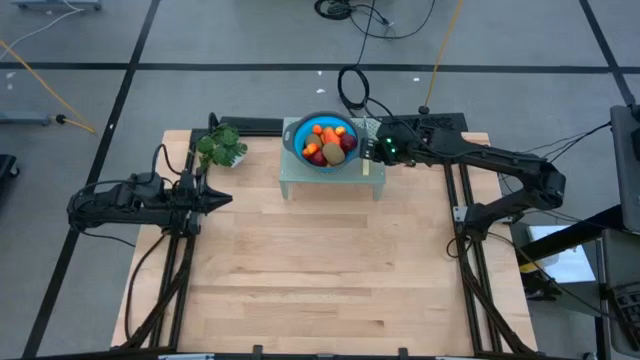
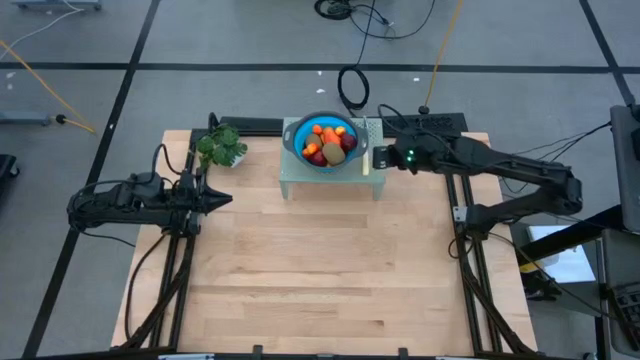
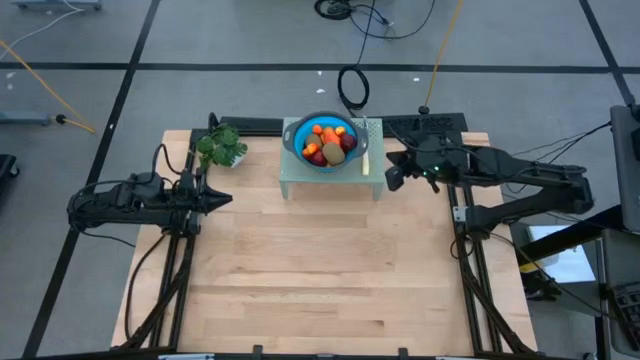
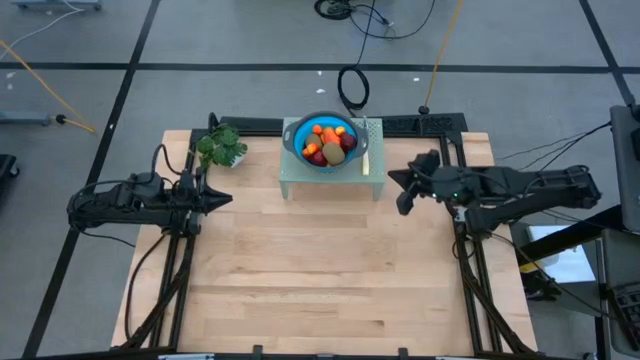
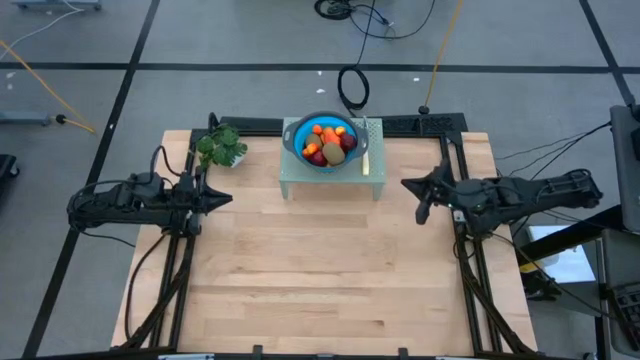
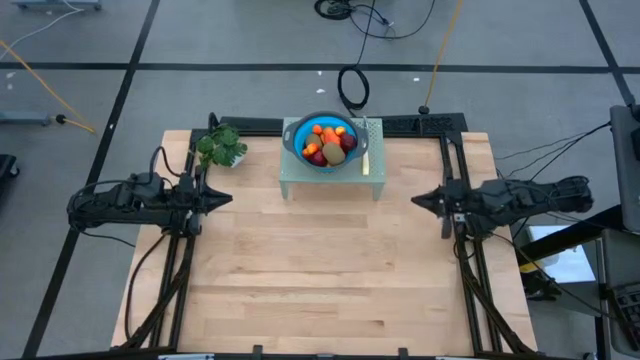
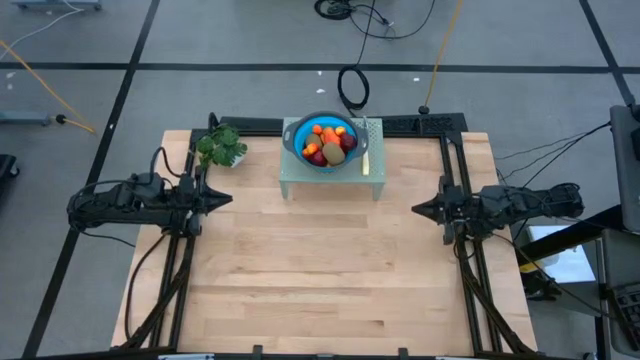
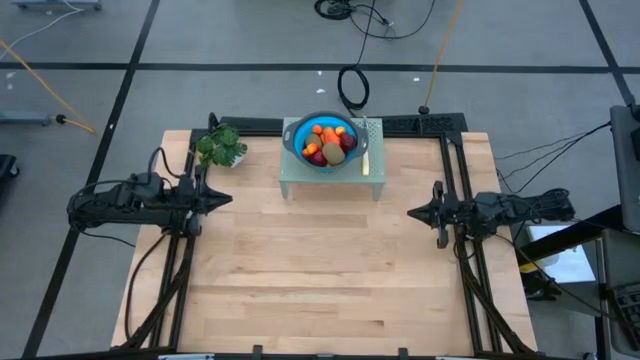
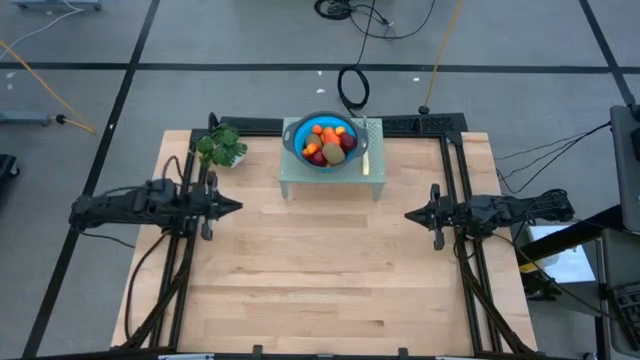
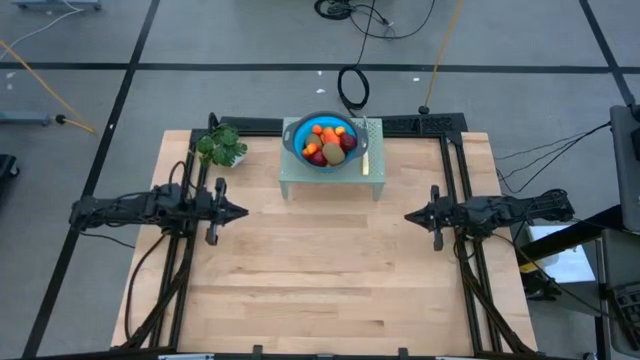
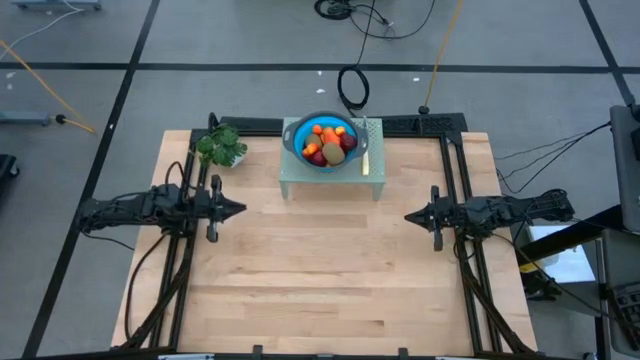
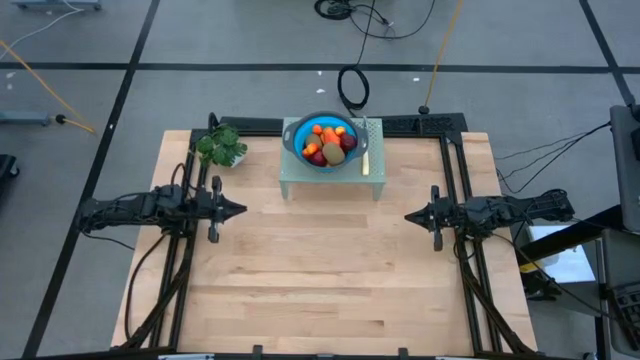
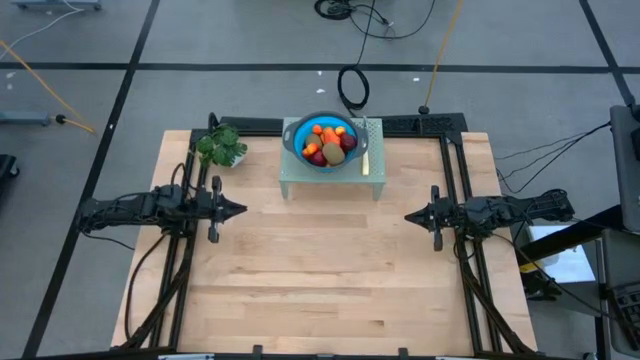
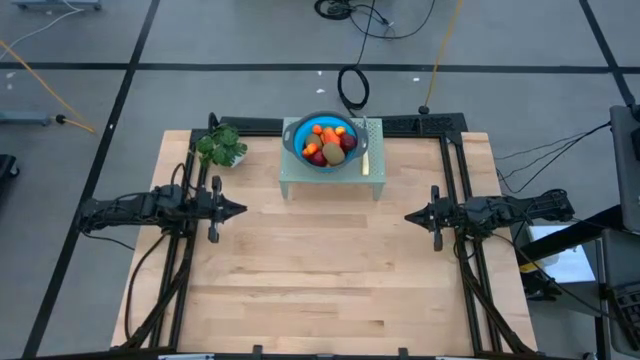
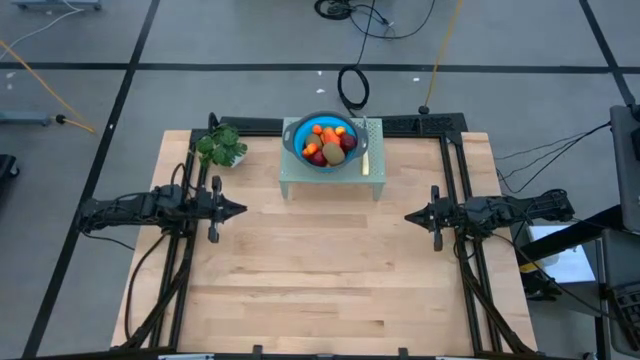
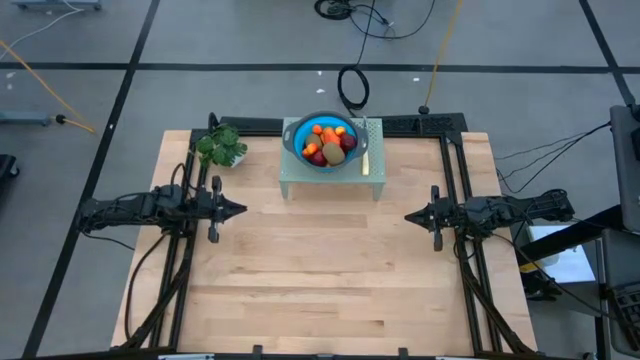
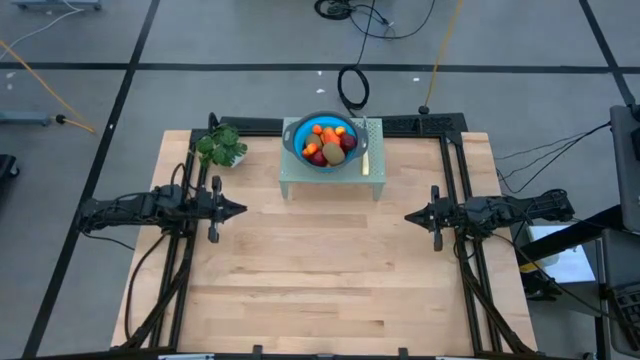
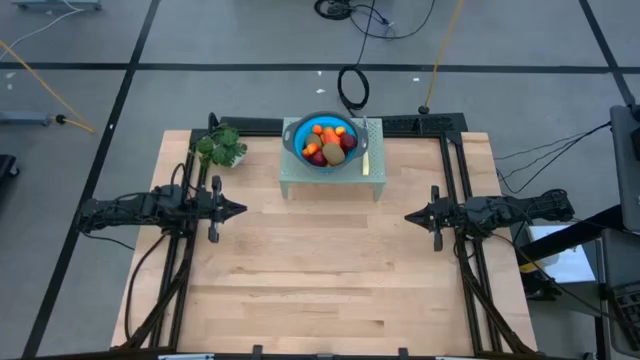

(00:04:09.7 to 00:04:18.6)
Task: Pick & Place Fruit
Return to Home Position

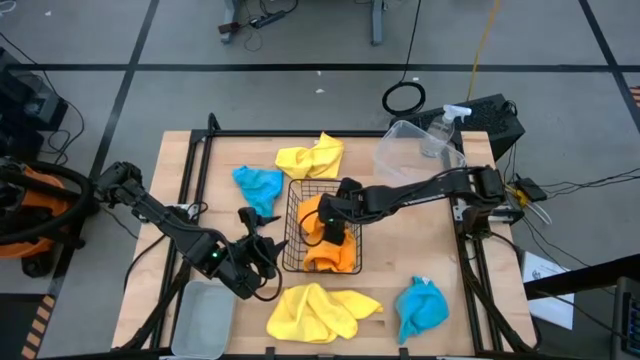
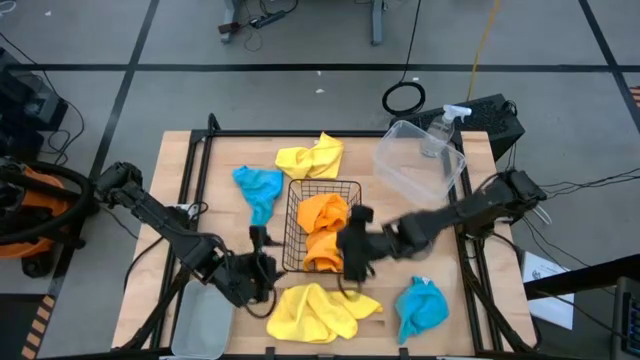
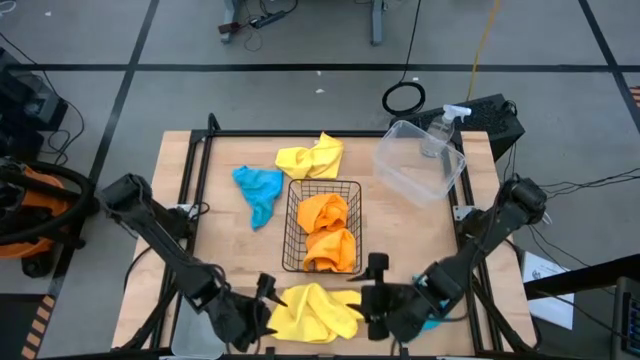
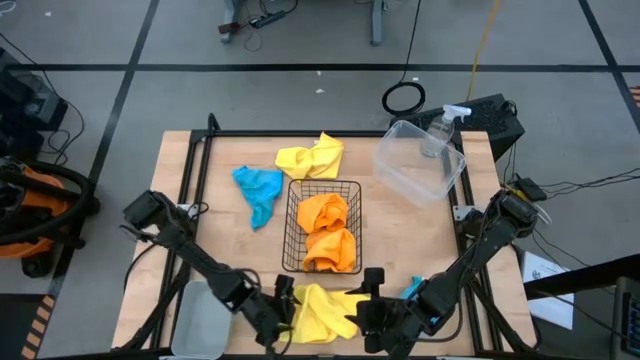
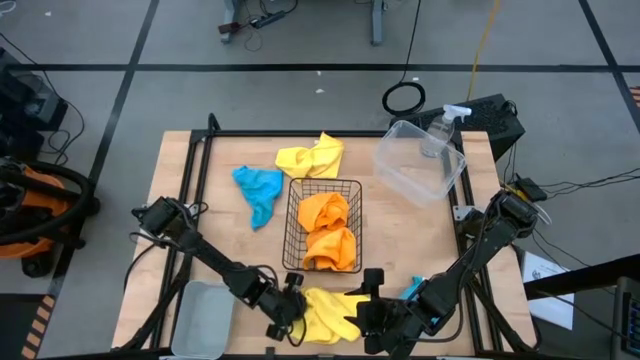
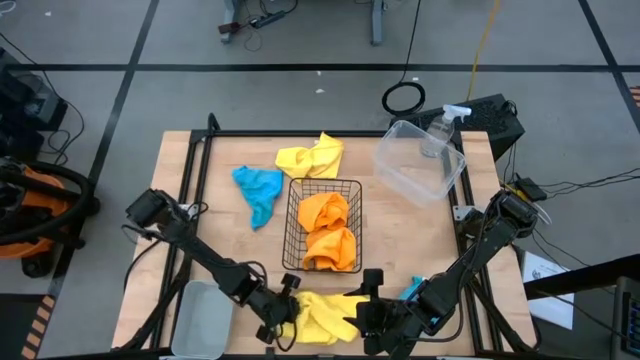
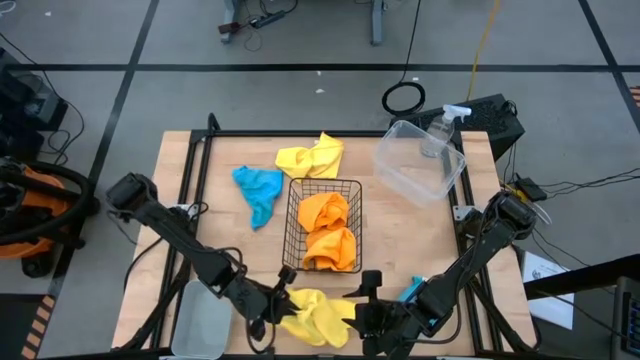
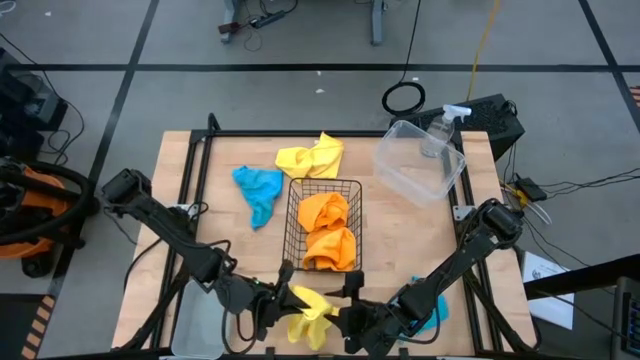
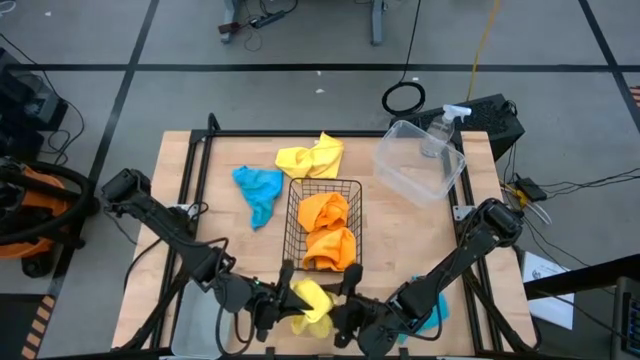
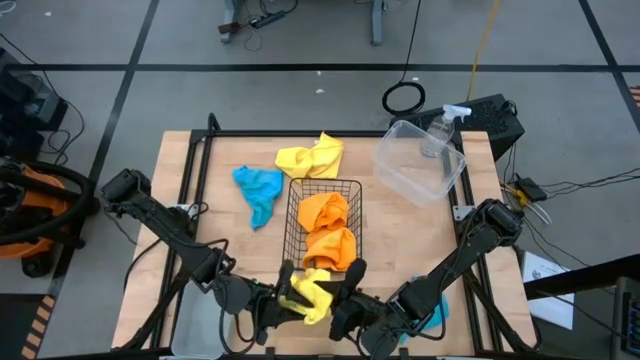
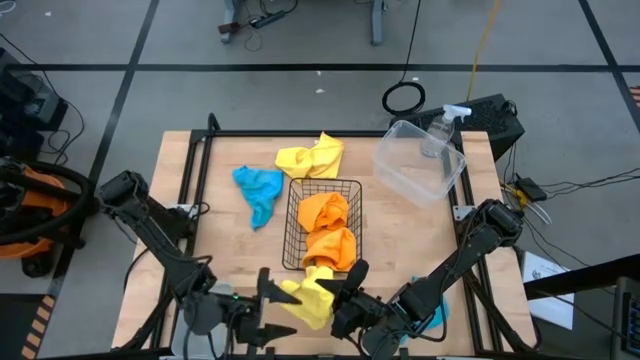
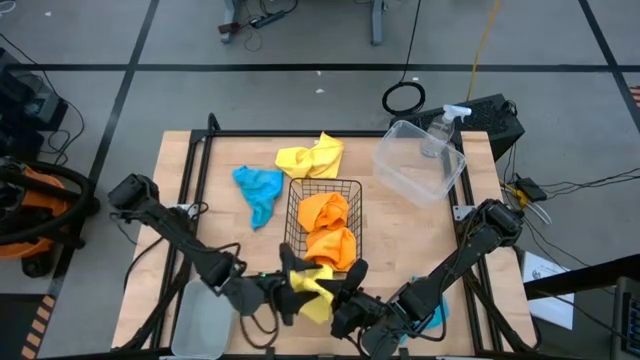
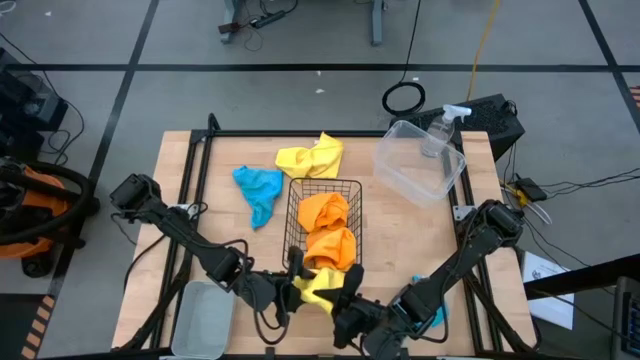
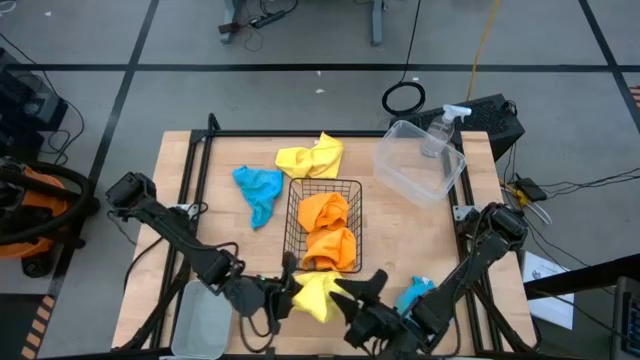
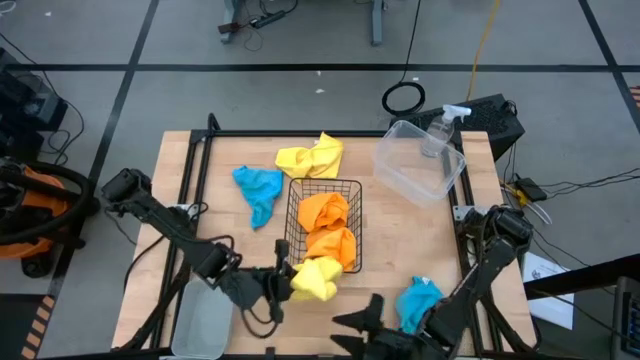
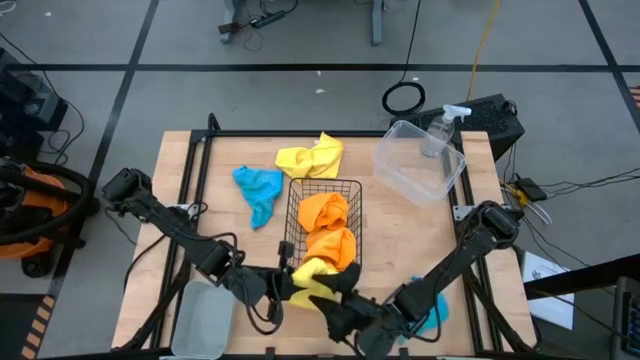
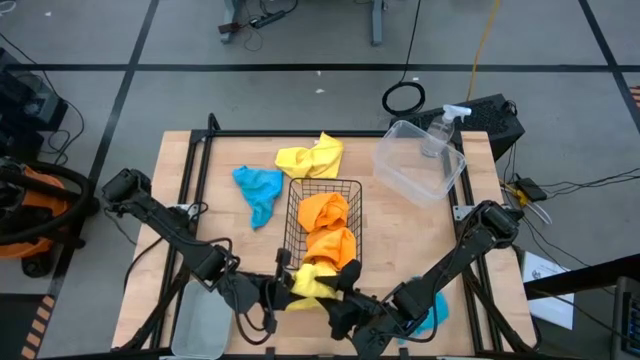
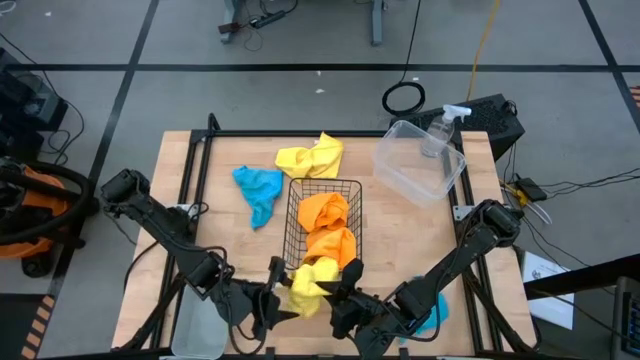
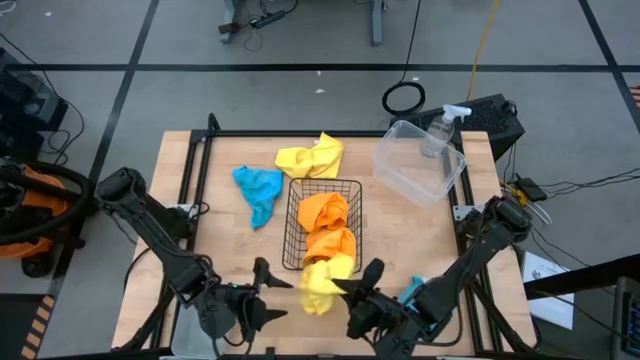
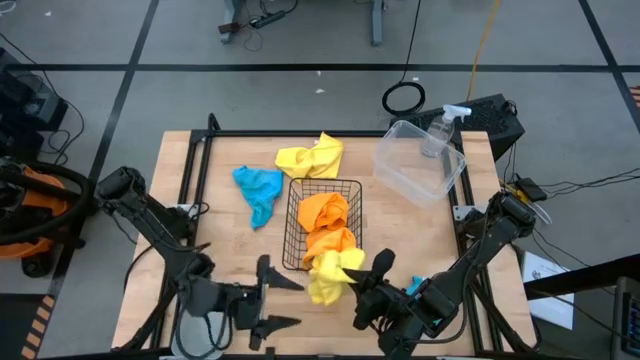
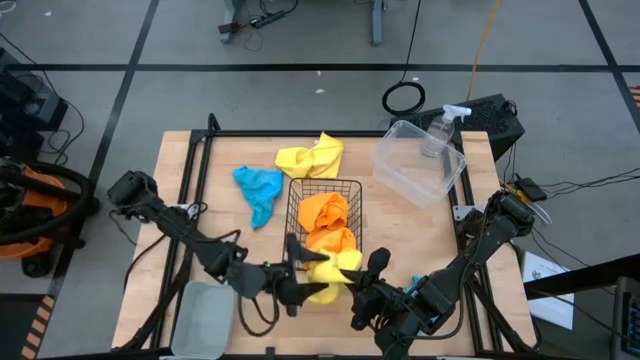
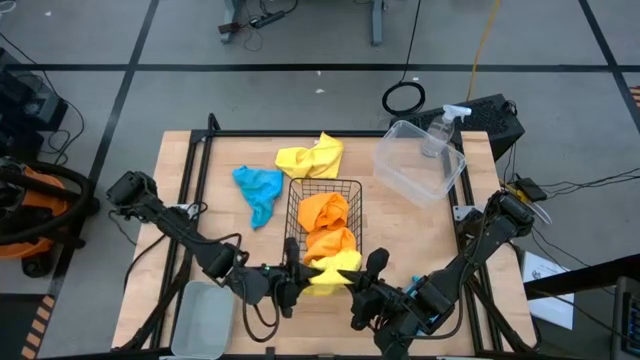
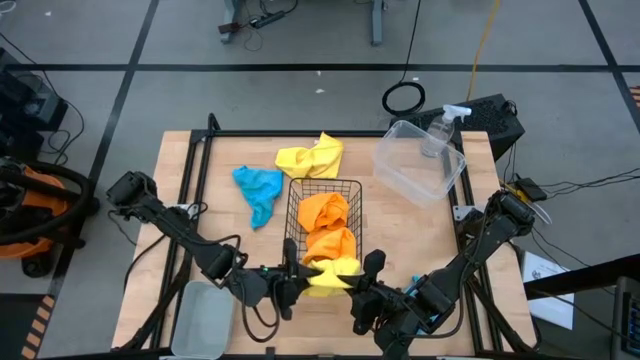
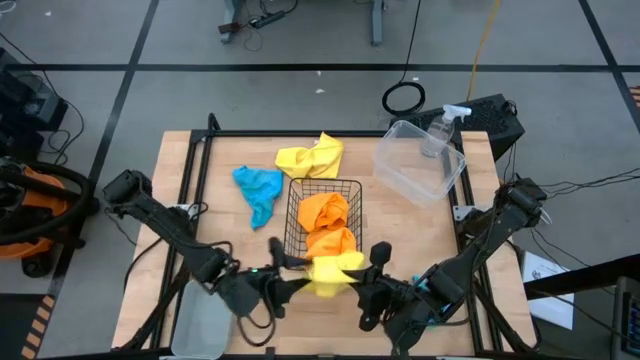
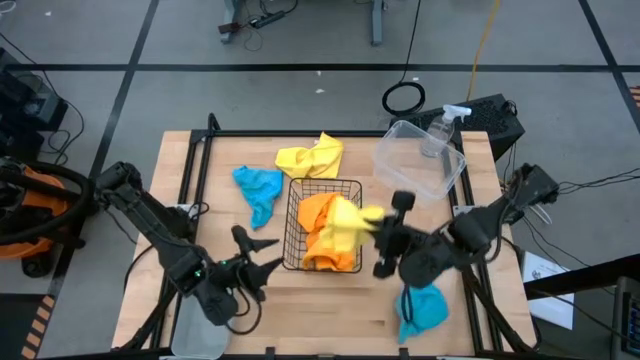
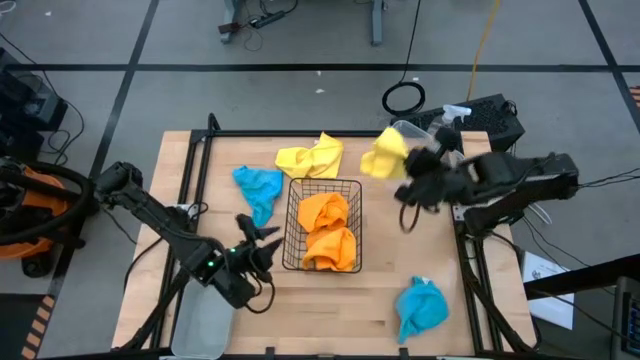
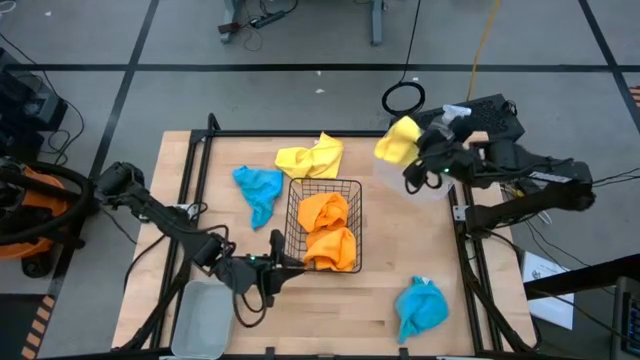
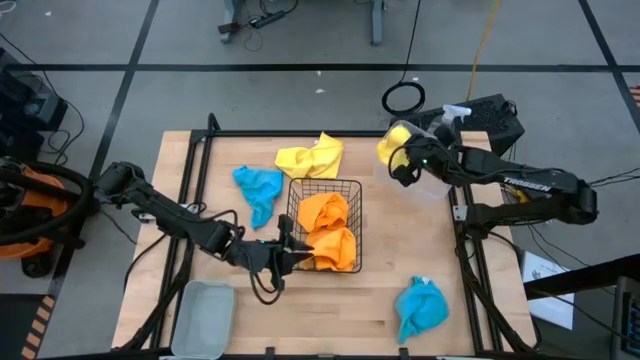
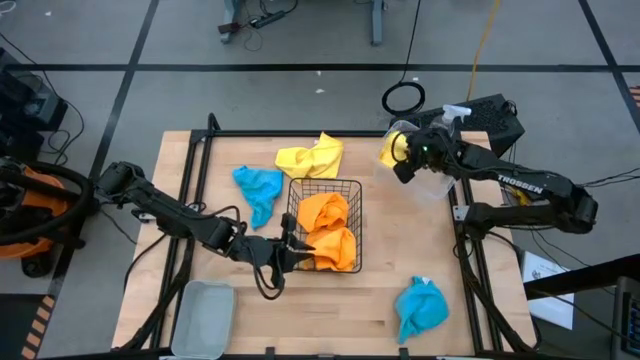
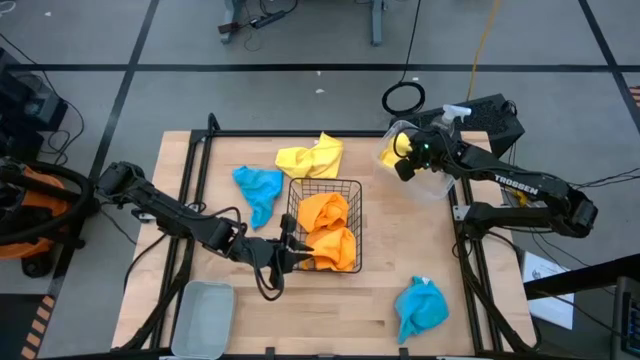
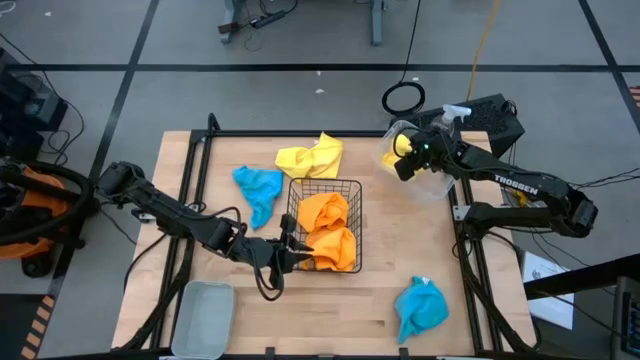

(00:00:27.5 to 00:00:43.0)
Task: Sort microfiber towel by color & place in baskets
Put the bottom yellow microfiber towel into the transparent bin
